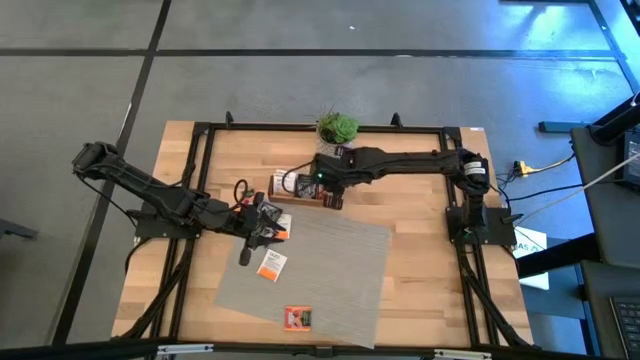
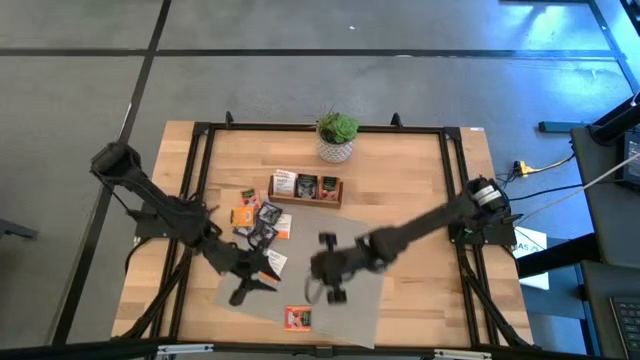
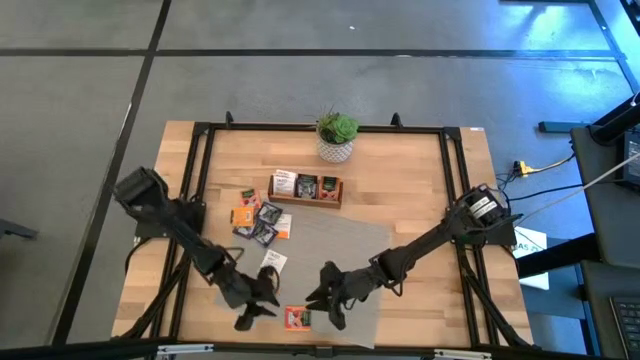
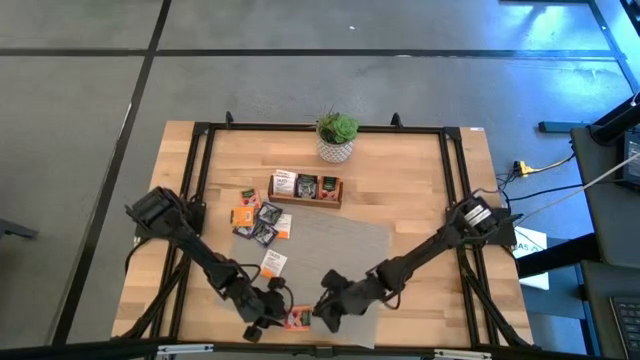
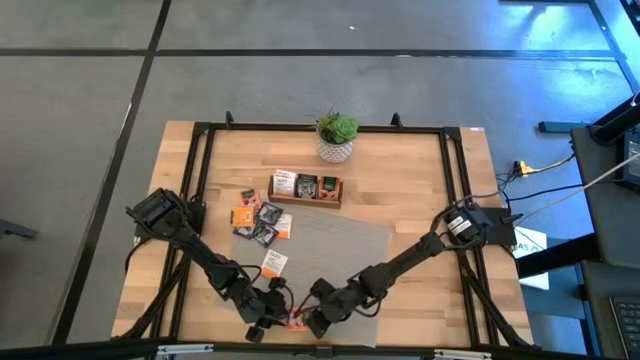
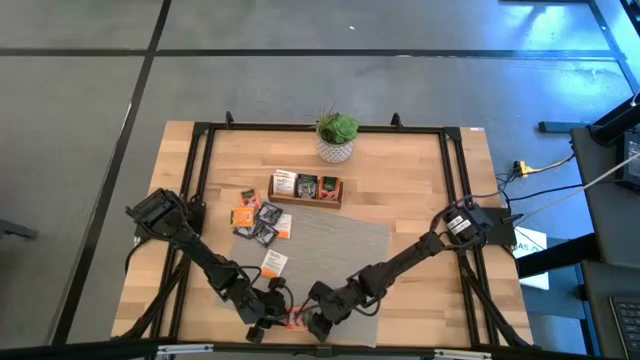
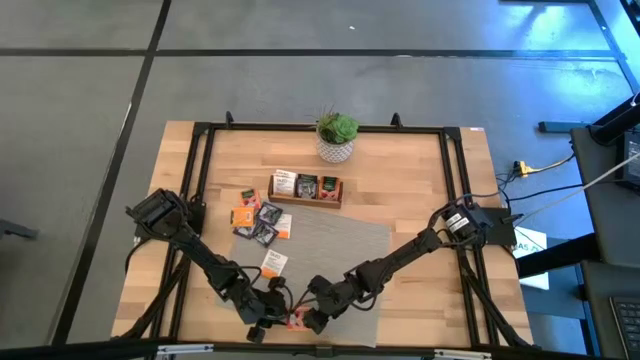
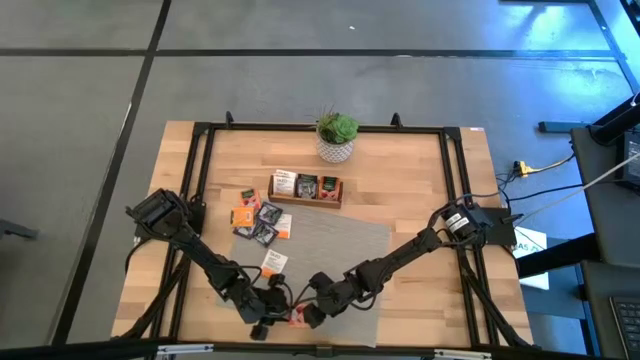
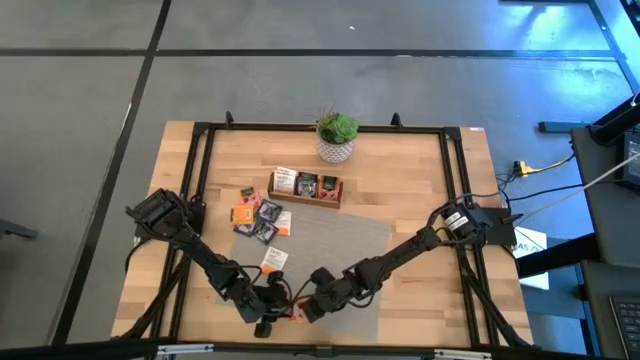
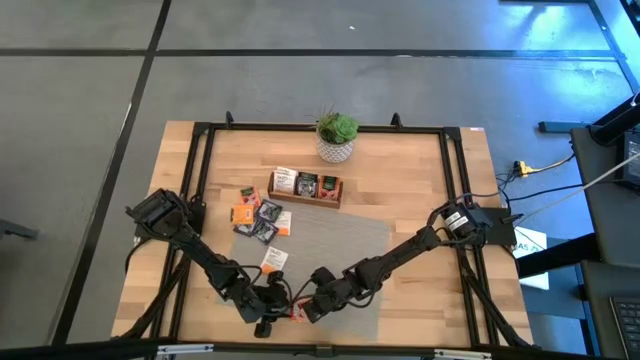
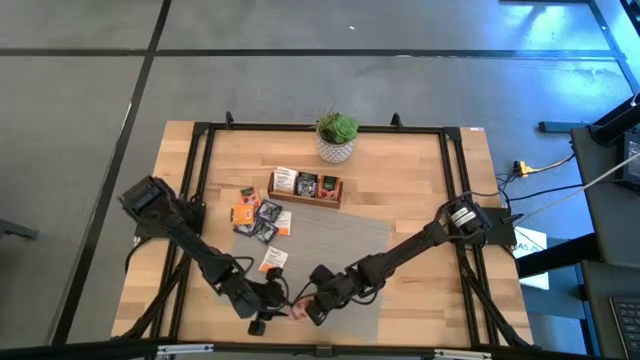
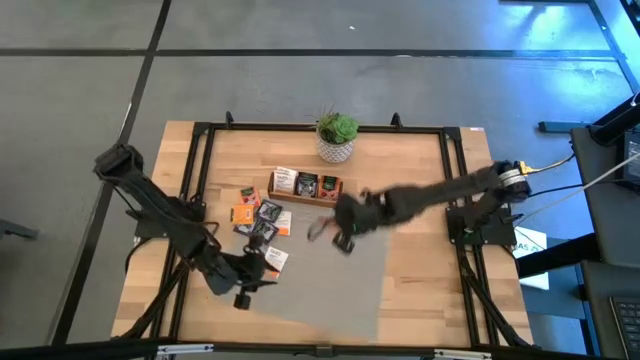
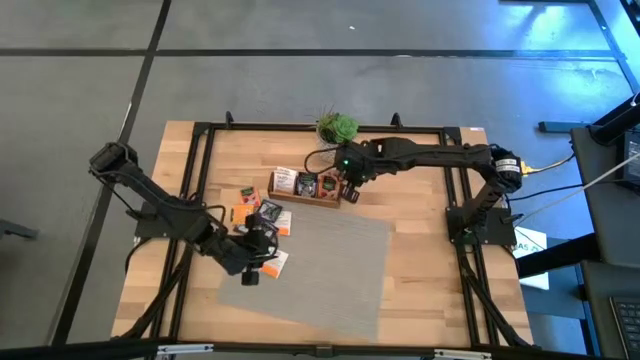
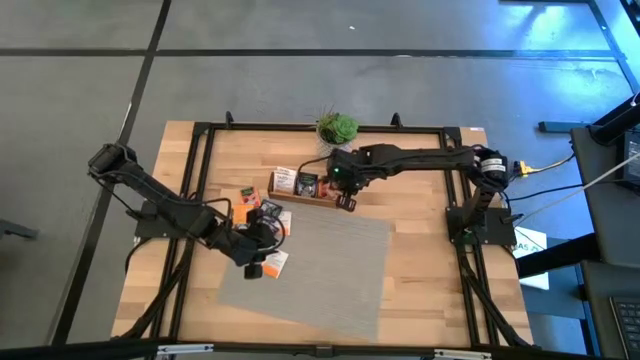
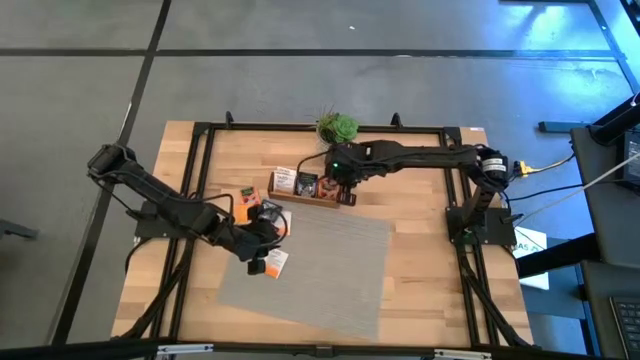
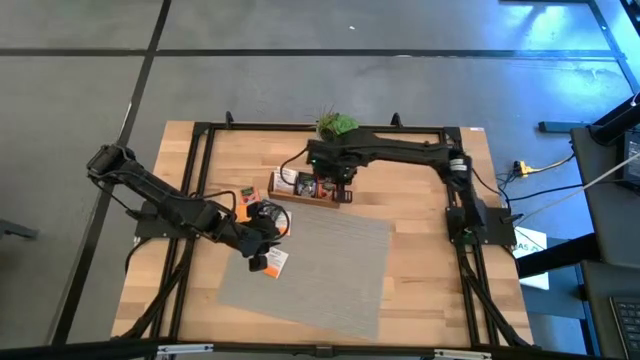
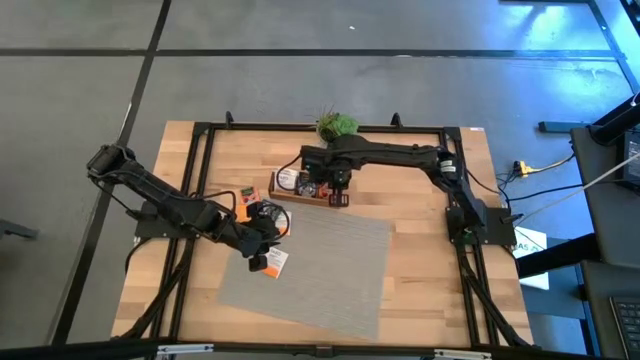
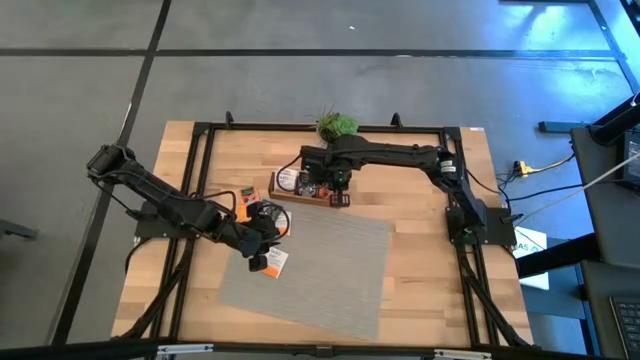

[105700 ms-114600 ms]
Task: Pick & Place Tea
Put the orange tea bag into the right section of the wooden organizer

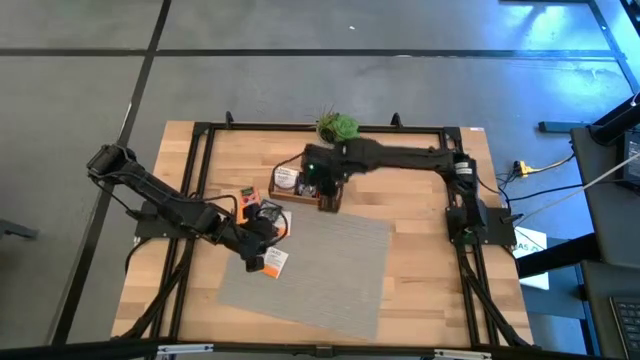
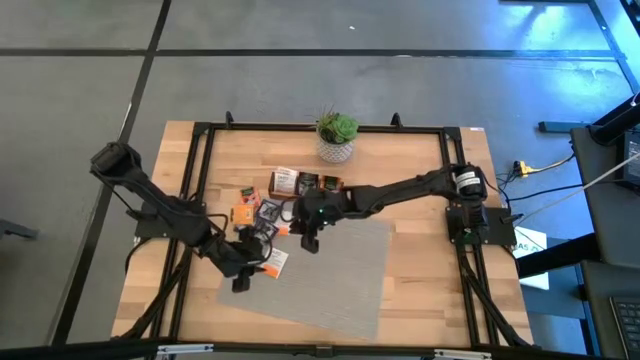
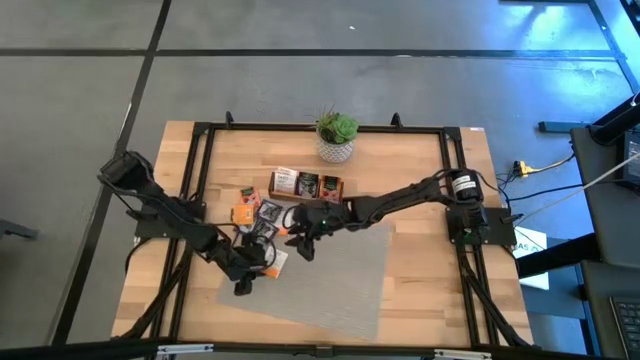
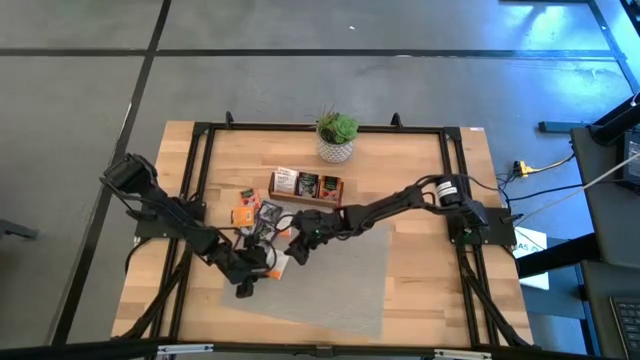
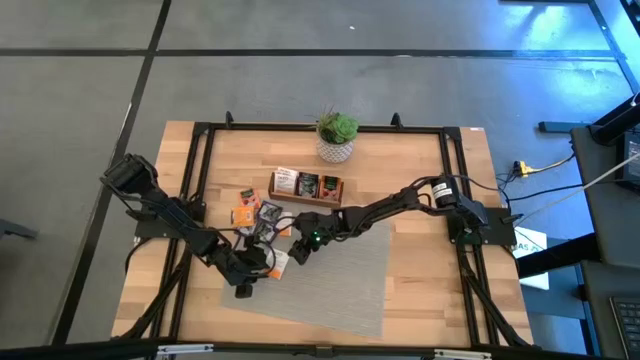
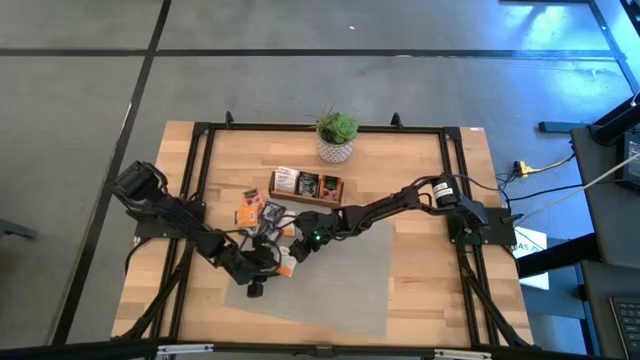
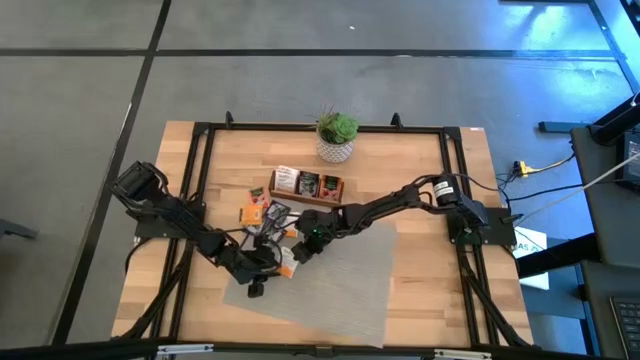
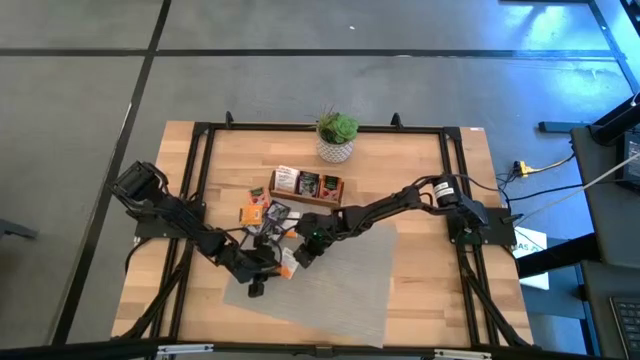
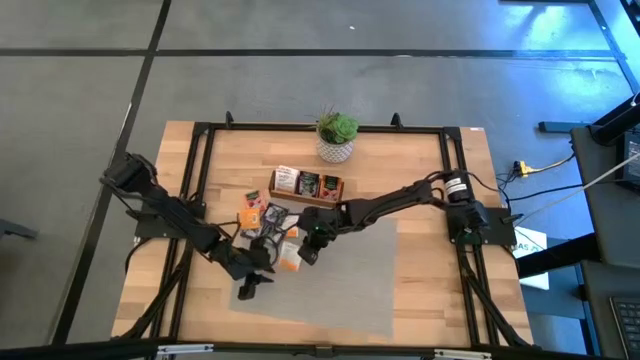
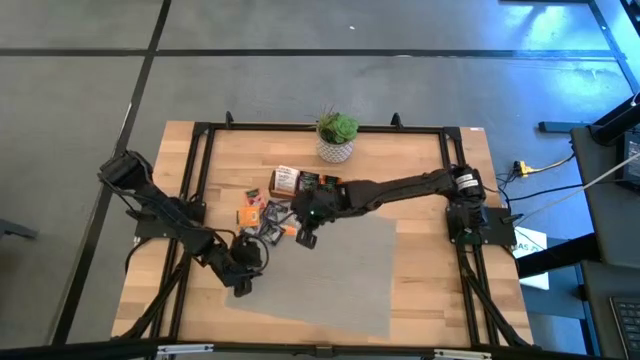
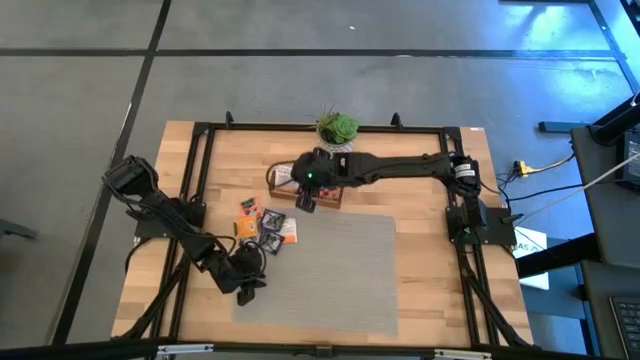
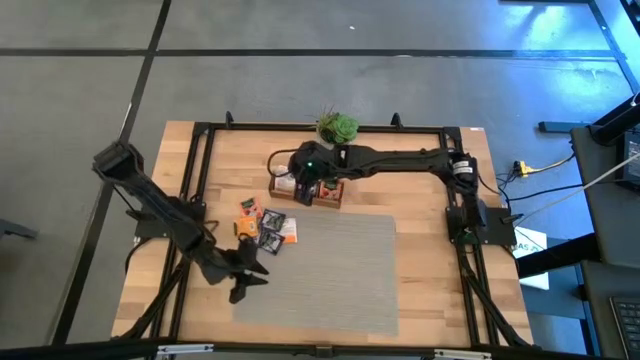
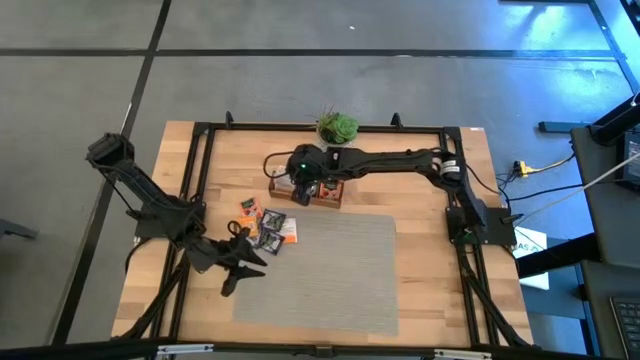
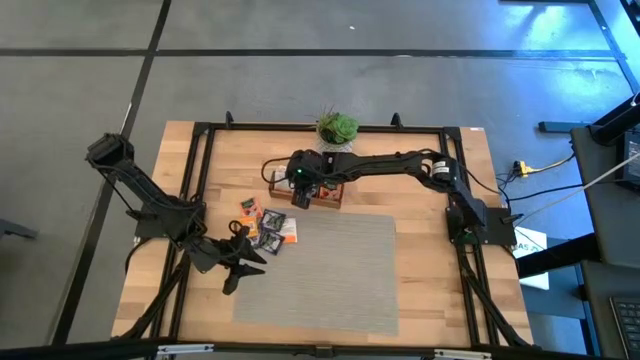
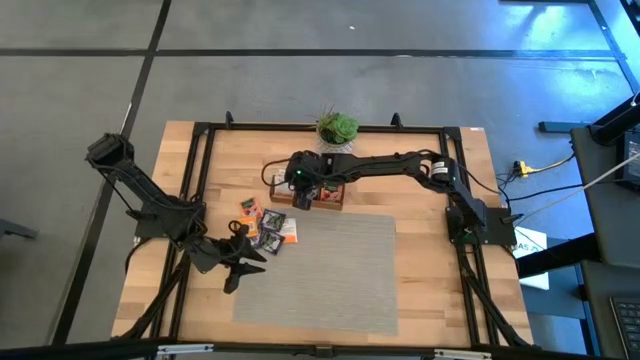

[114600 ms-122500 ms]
Put the white tea bag into the left section of the wooden organizer

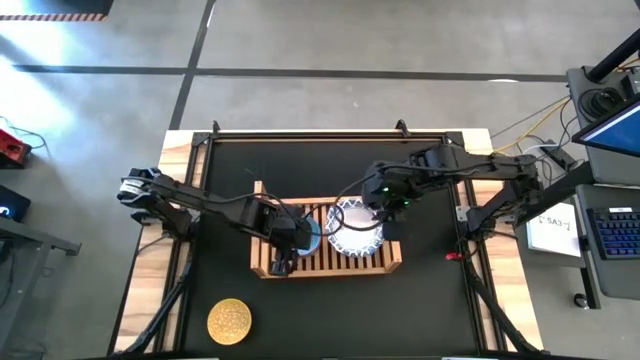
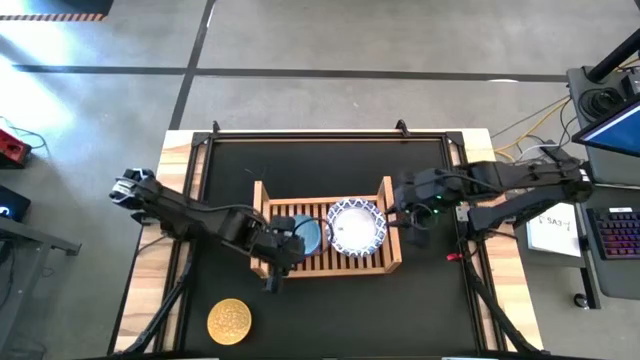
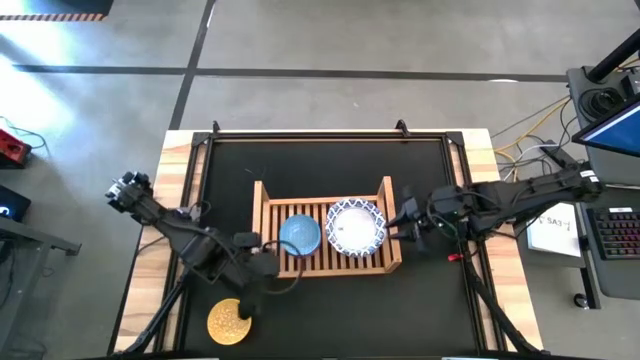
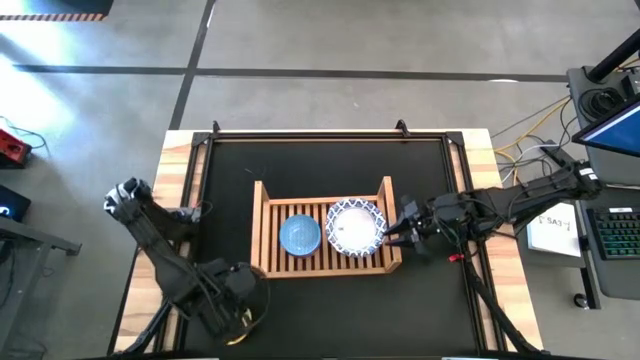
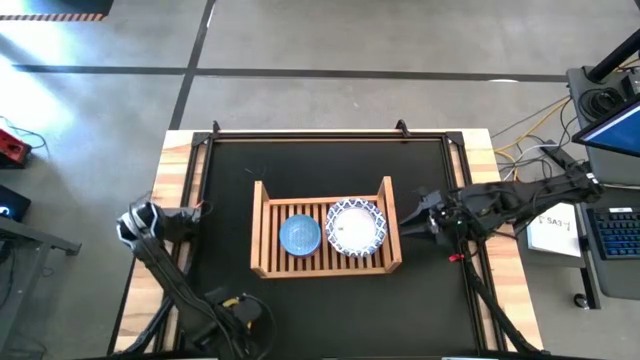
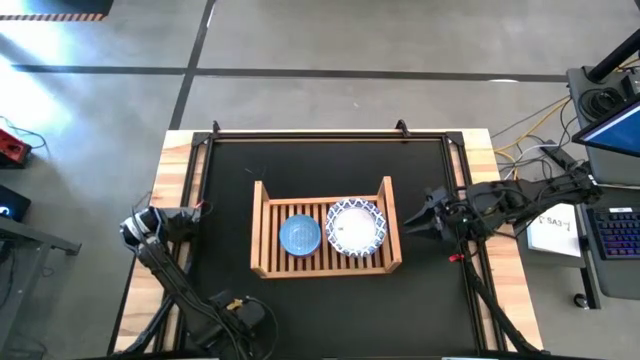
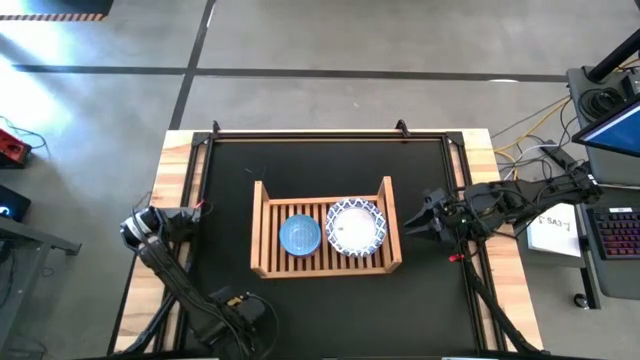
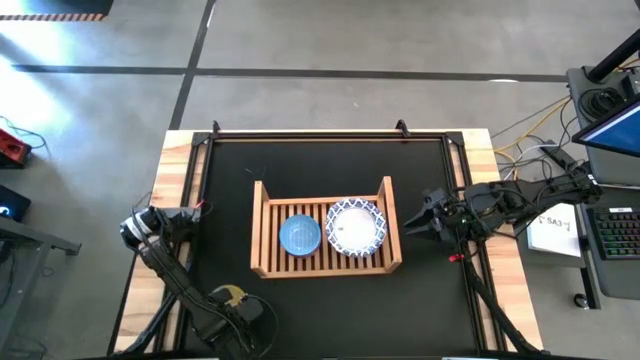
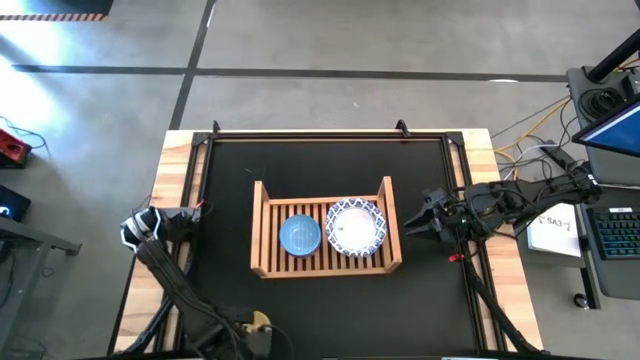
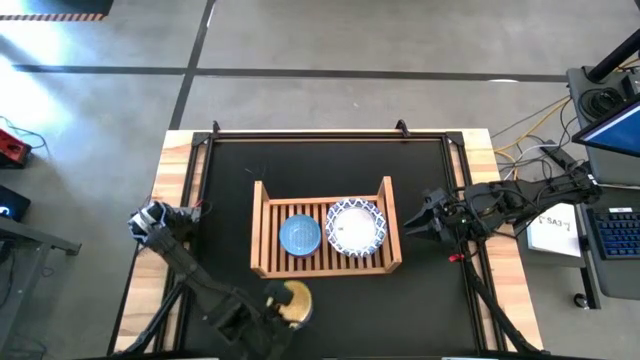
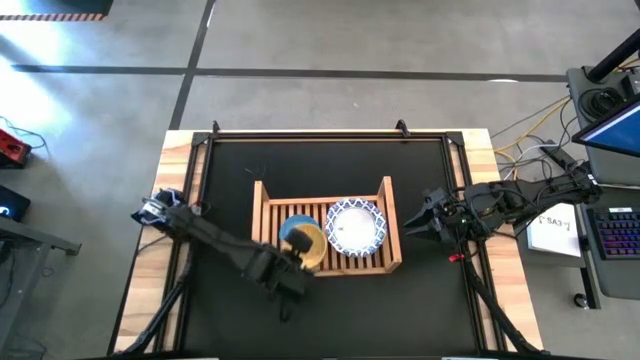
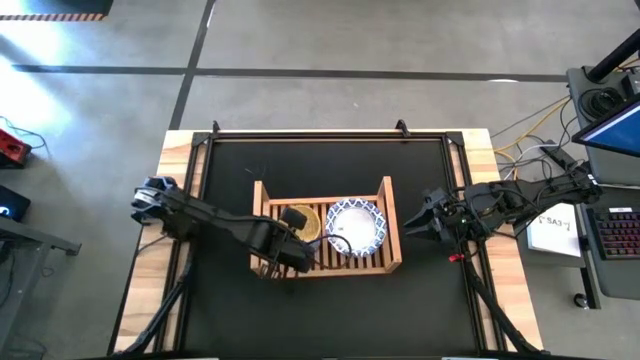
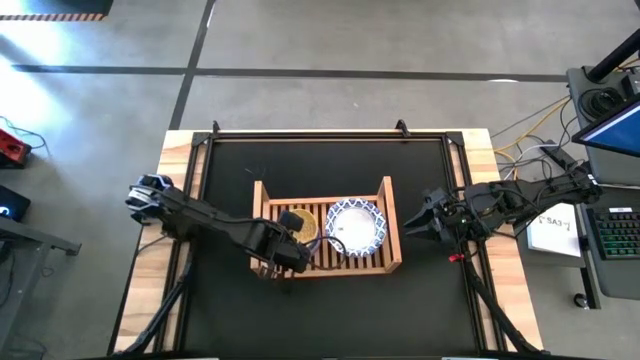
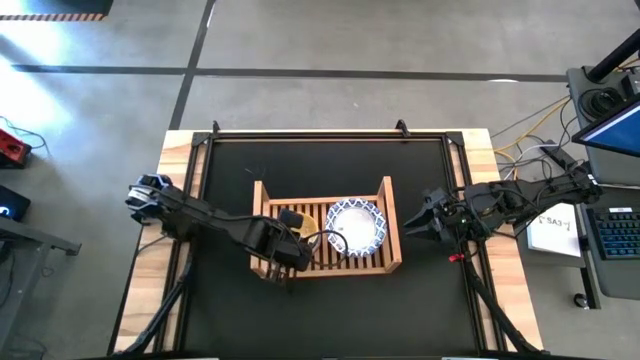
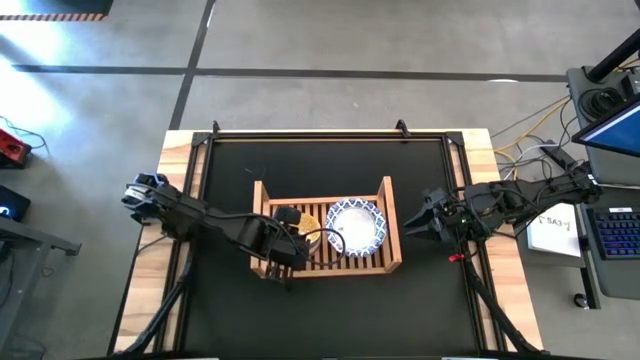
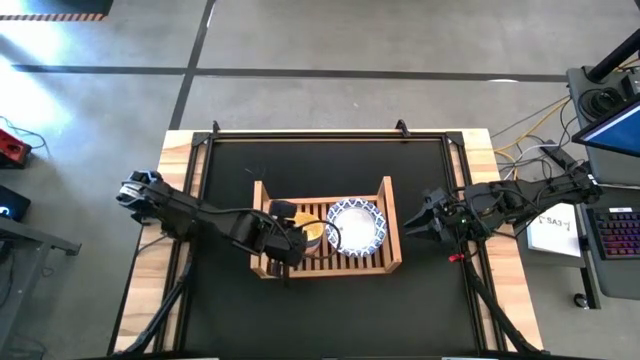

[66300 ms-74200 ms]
Task: Place and stack bowls onto a shelf
Stack the yellow patterned bowl on top of the blue patterned bowl on the shelf
